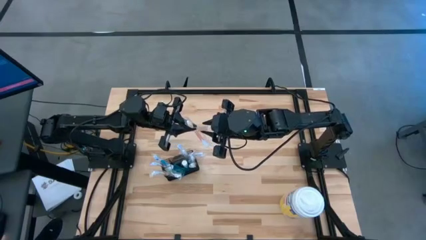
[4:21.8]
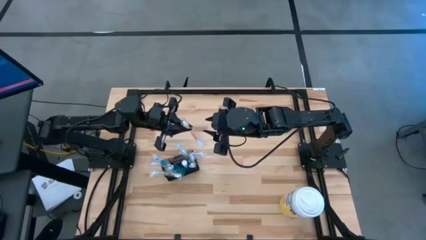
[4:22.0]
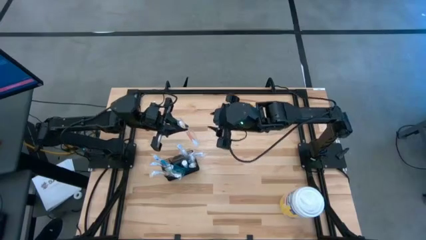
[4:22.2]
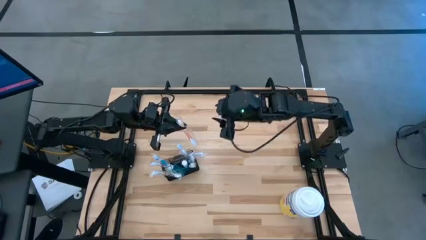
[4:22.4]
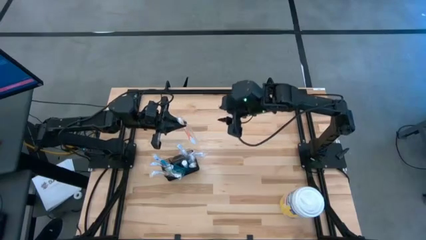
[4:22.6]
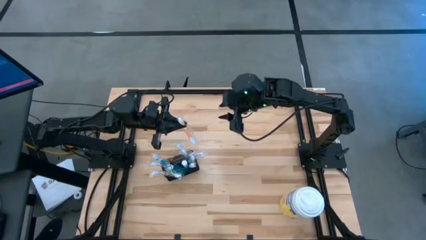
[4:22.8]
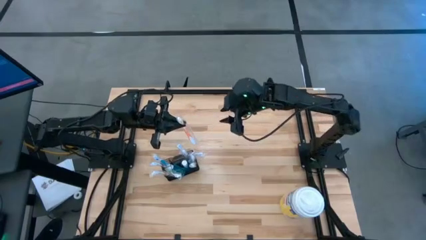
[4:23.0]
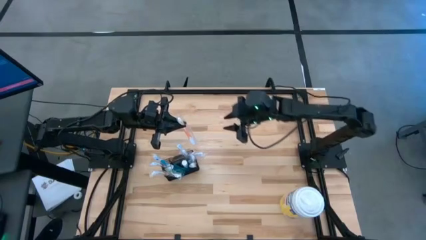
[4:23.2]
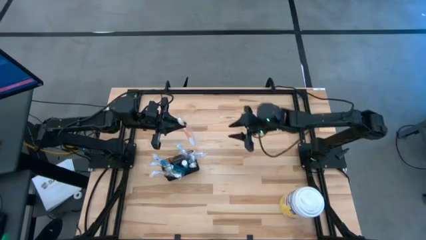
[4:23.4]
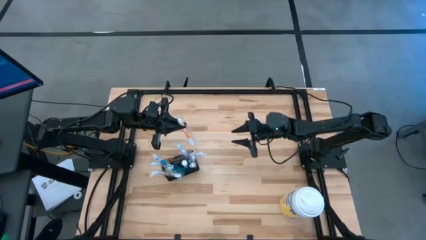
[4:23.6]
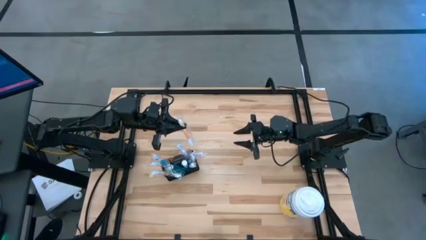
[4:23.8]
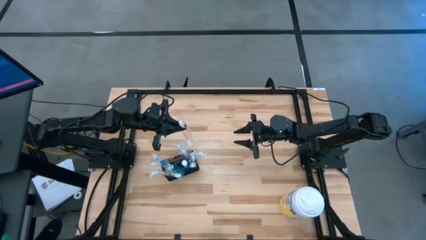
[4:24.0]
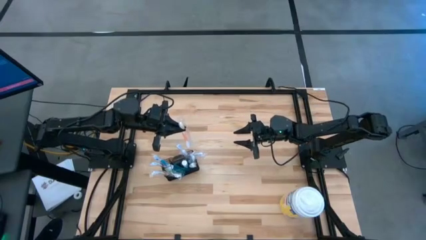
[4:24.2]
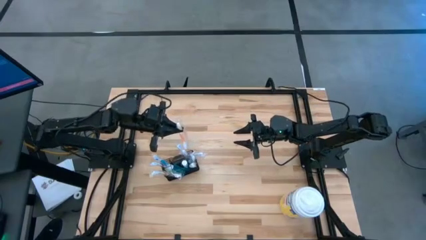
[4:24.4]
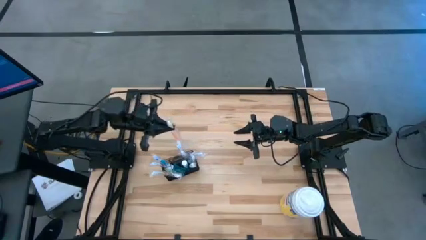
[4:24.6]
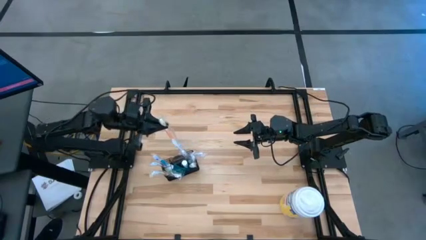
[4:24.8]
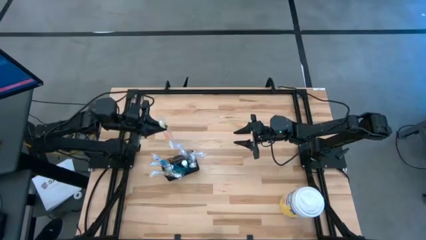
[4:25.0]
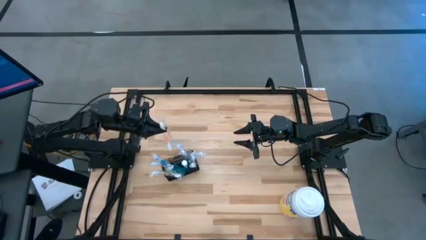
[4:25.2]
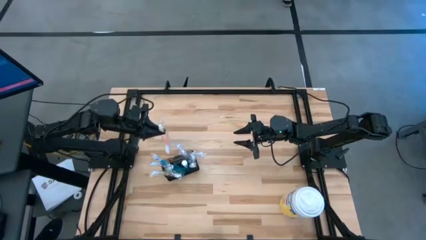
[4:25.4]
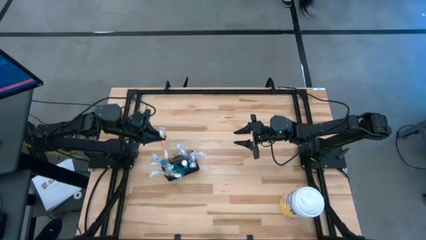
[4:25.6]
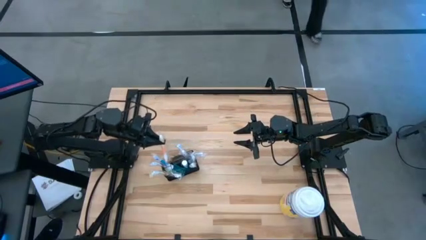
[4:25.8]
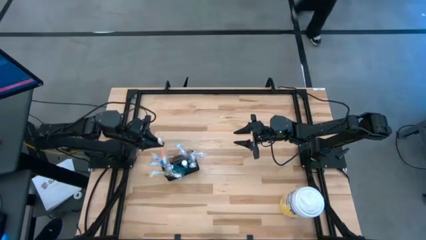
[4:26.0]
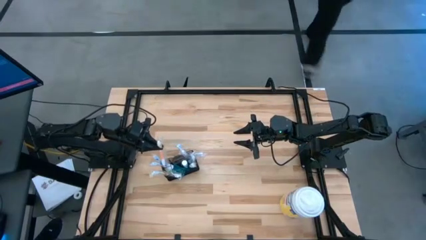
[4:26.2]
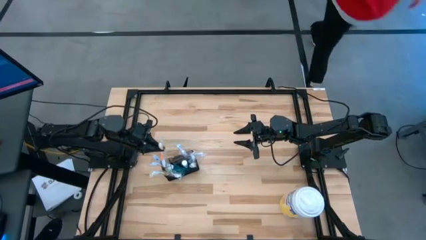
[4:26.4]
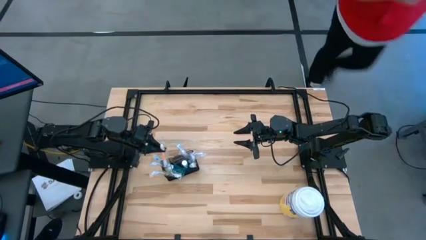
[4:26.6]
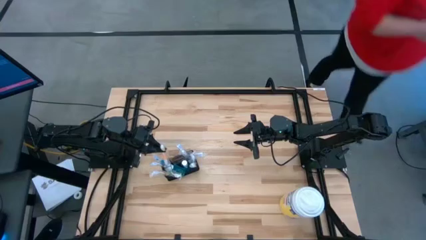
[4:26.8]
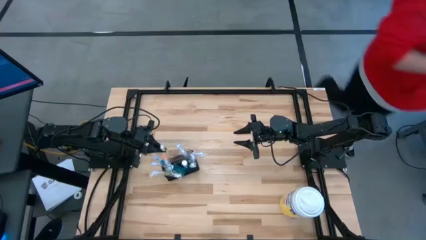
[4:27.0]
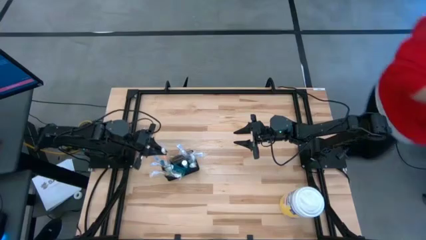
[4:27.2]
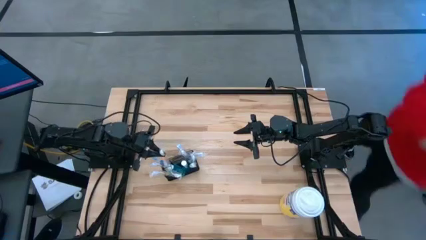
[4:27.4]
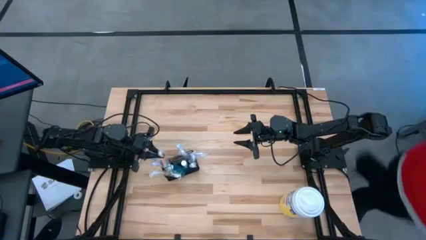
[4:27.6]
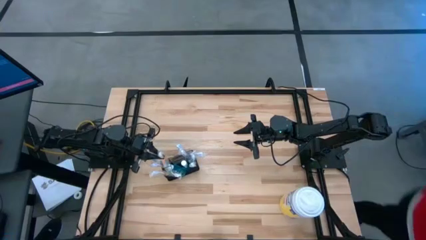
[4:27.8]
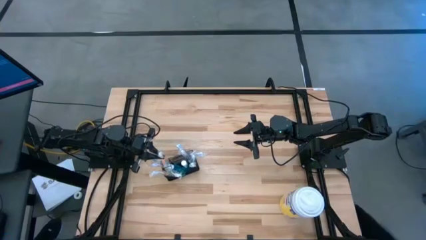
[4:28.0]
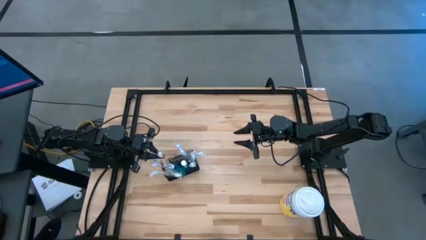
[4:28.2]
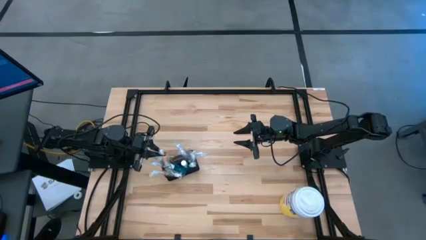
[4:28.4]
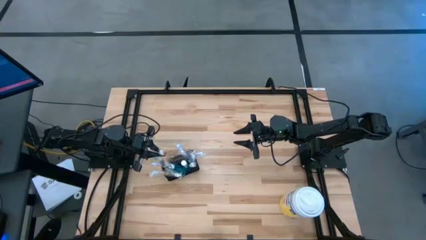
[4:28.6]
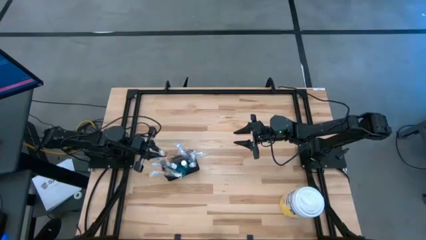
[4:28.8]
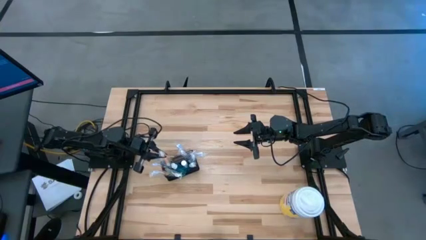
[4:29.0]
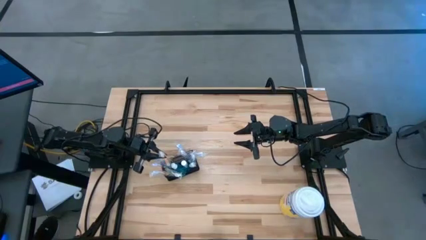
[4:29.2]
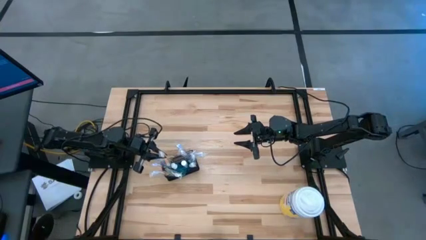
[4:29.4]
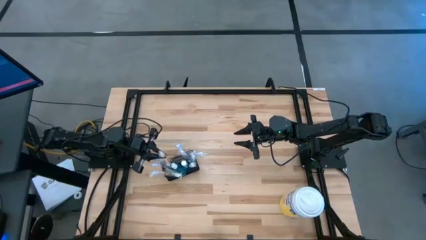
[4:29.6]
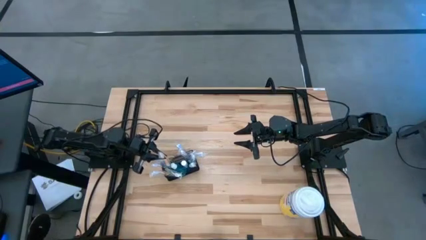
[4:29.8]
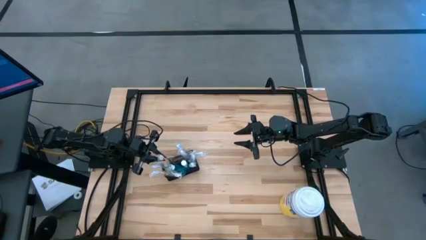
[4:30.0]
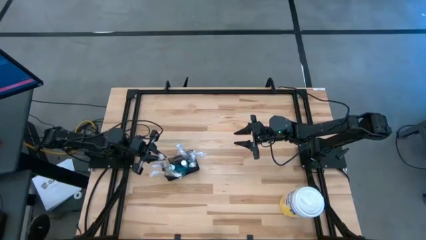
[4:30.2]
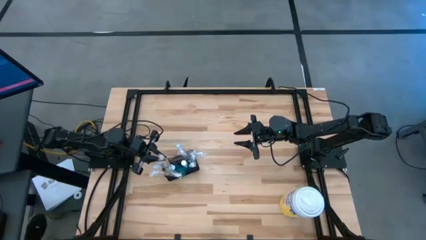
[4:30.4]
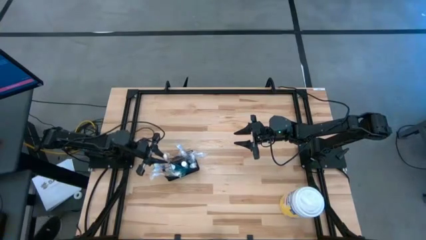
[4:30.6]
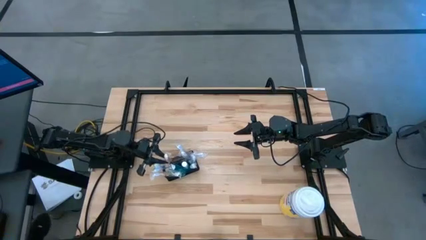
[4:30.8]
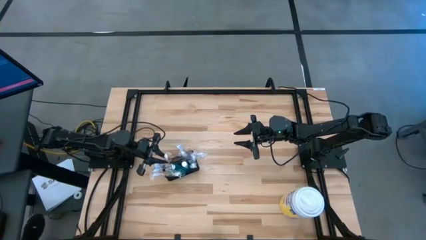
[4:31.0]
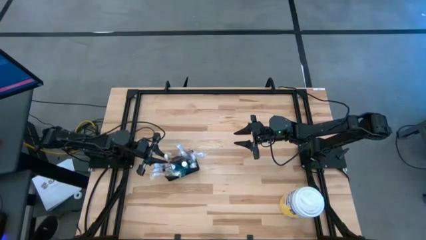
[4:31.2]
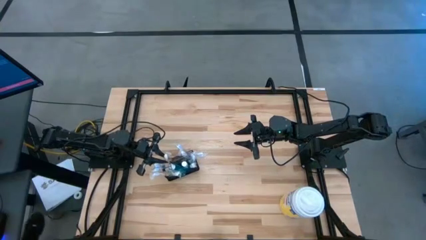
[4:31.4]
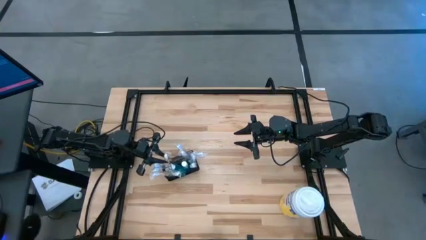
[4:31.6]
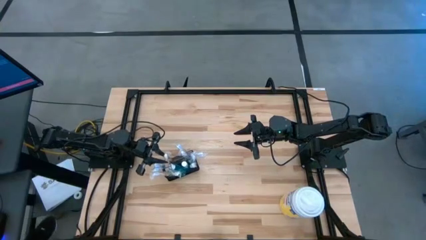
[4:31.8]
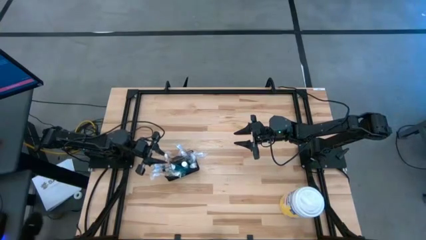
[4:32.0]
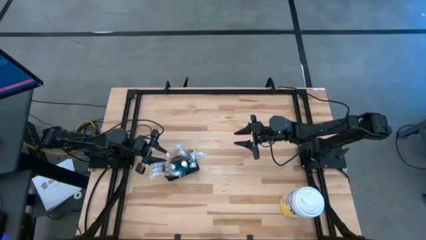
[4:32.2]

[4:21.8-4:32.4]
Task: Pick & Place toothbrushing station
Put the orange toothbrush into the top left section of the mesh organizer

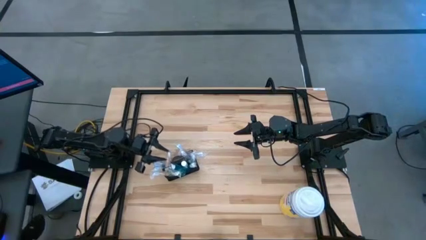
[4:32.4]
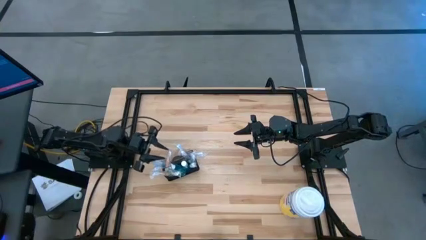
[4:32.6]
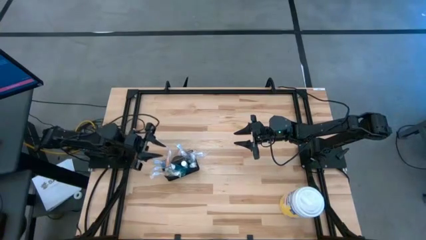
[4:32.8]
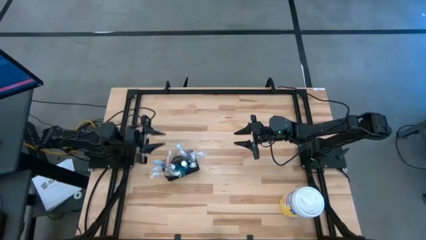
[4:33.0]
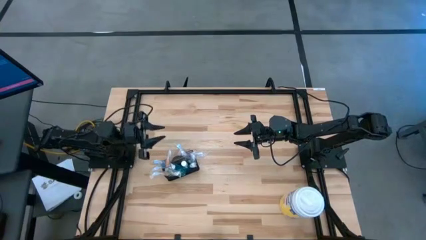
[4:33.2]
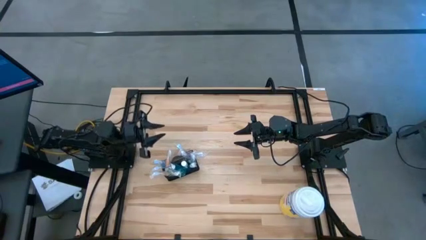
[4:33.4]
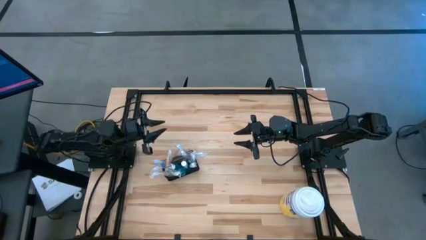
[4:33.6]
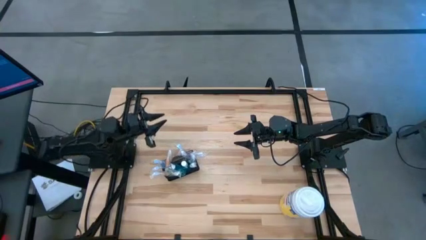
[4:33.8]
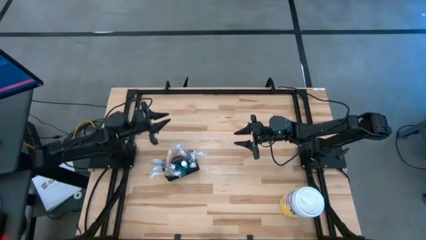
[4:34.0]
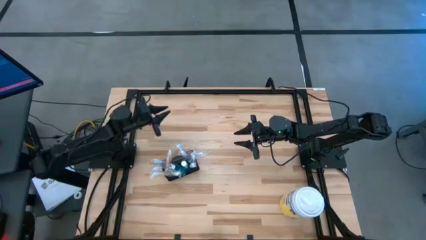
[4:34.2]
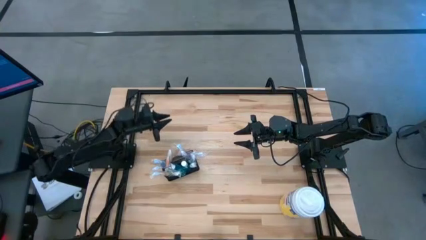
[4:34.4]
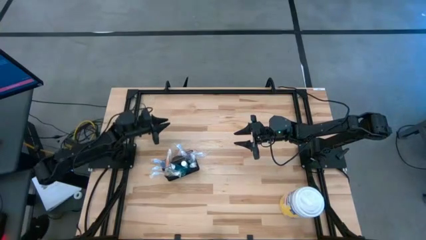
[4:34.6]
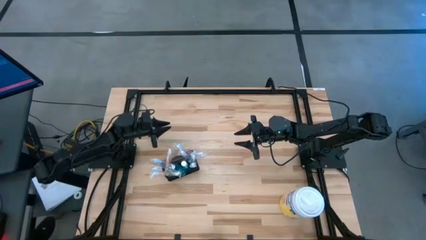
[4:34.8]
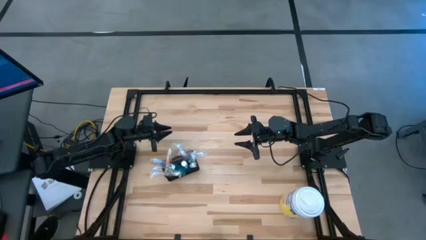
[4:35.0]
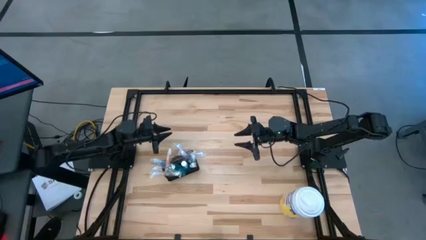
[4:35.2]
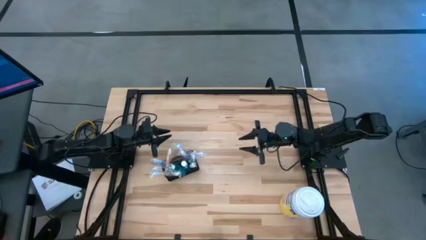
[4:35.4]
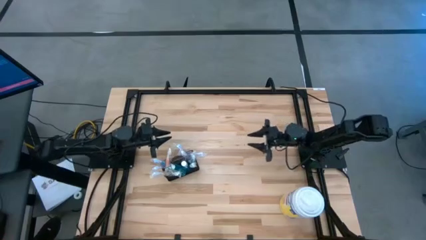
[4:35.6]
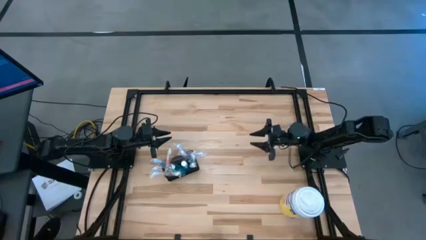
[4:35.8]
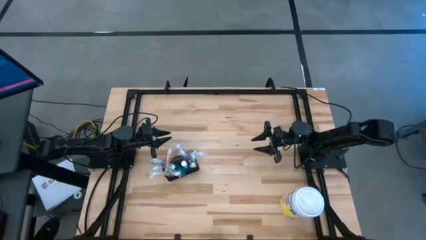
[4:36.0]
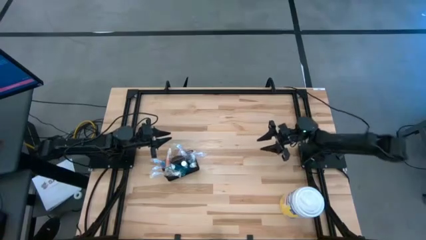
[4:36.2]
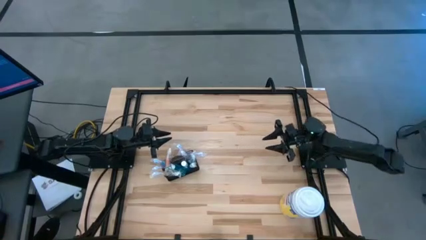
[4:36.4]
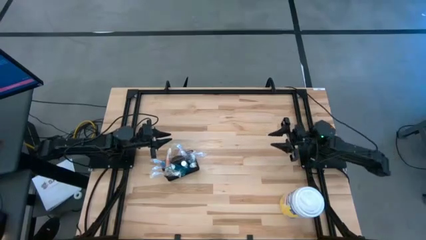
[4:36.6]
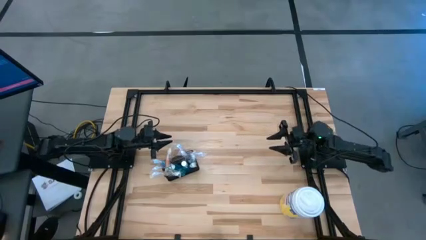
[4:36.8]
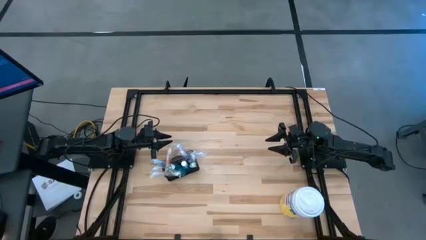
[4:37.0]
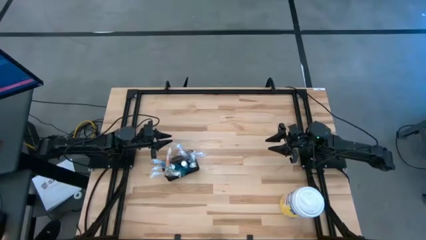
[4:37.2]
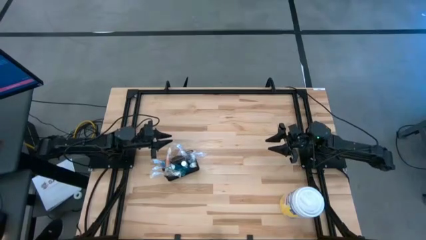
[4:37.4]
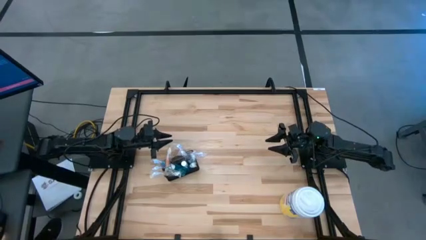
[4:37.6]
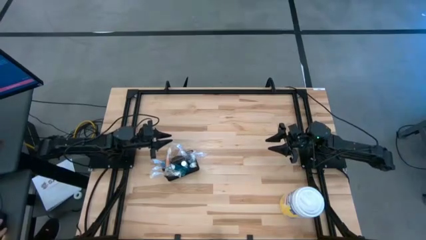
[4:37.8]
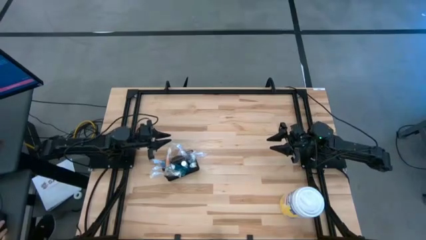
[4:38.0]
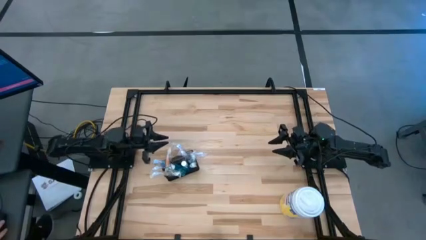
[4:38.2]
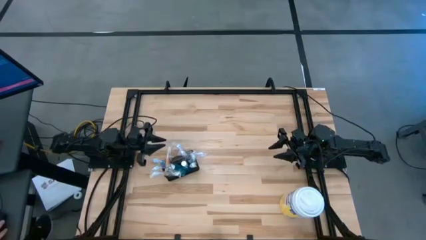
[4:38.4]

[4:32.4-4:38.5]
Return to Home Position
